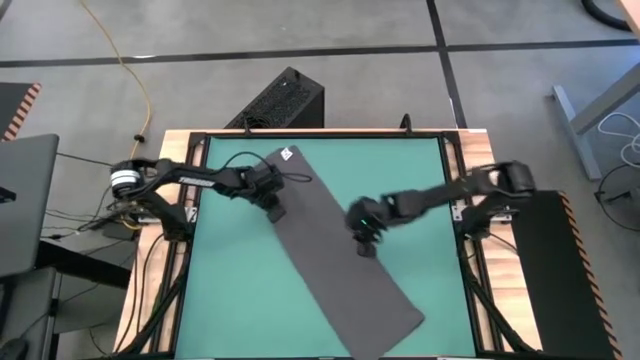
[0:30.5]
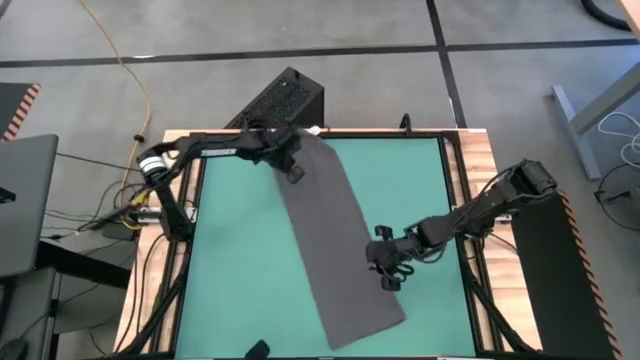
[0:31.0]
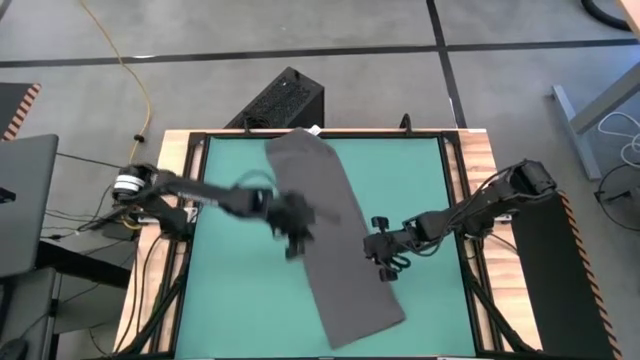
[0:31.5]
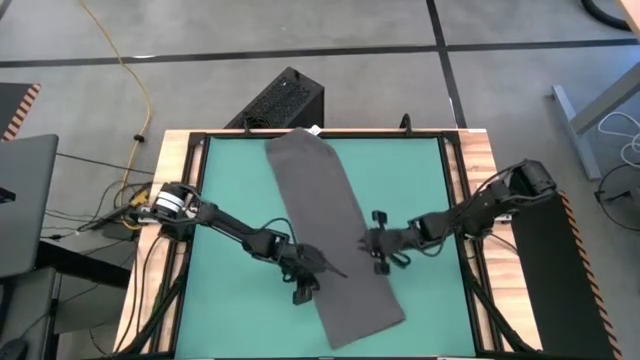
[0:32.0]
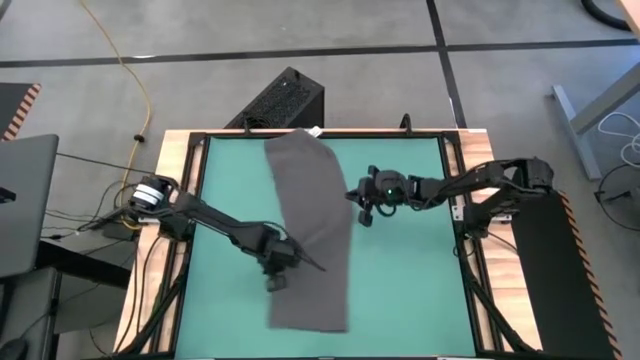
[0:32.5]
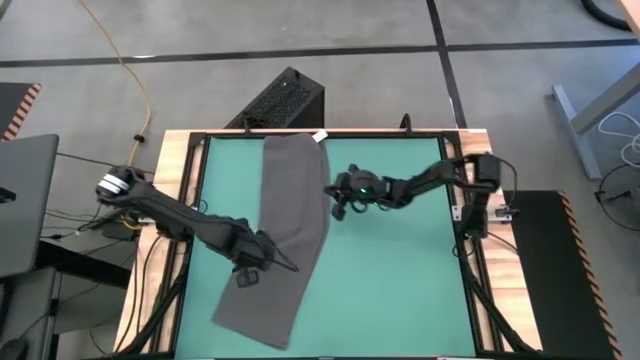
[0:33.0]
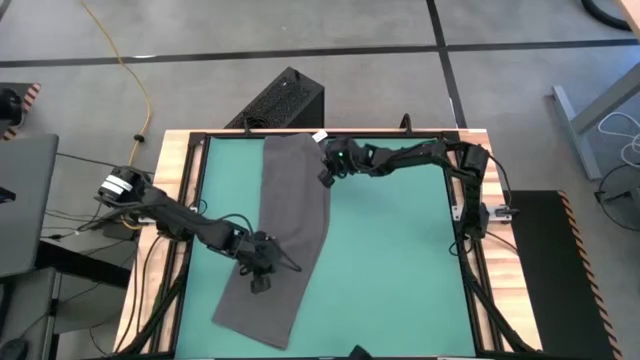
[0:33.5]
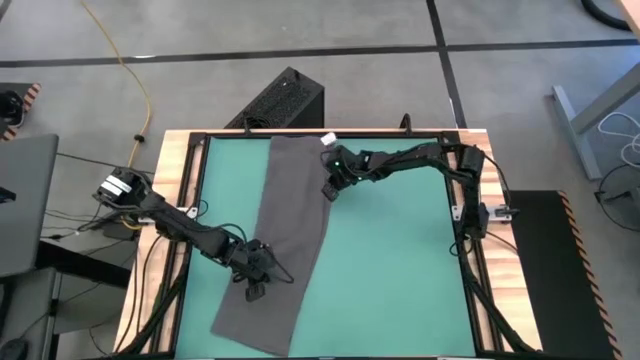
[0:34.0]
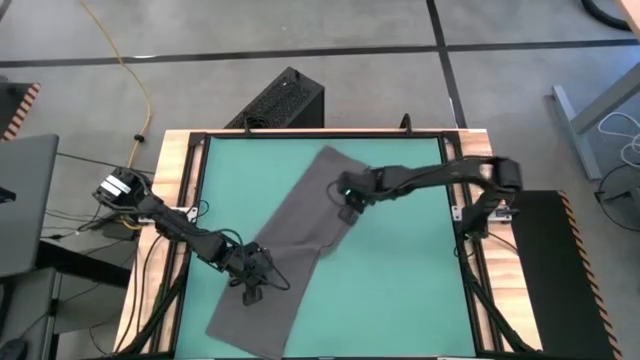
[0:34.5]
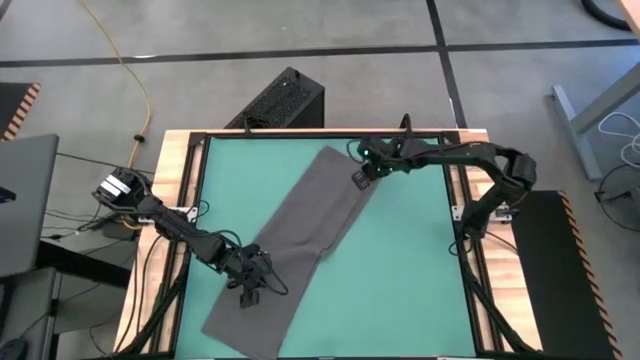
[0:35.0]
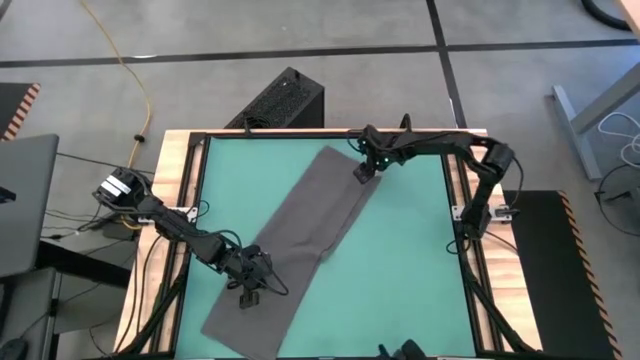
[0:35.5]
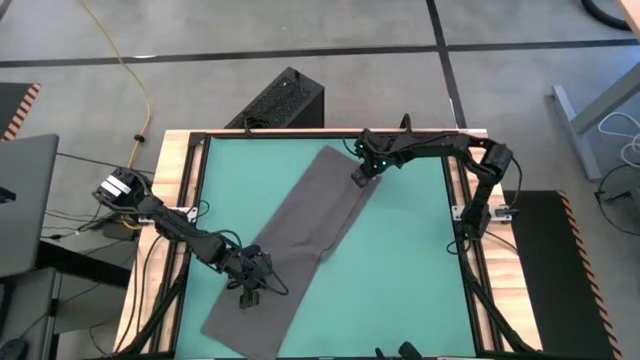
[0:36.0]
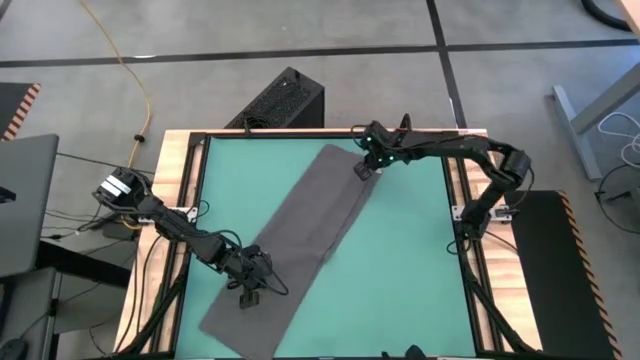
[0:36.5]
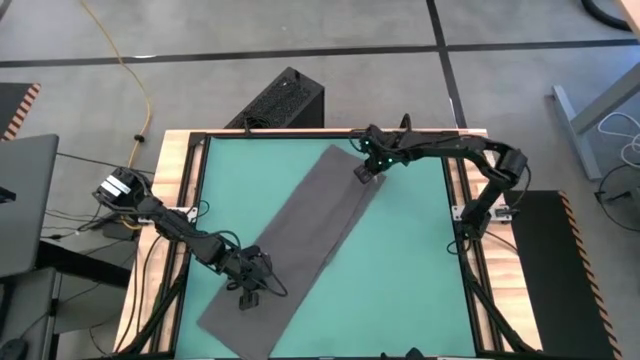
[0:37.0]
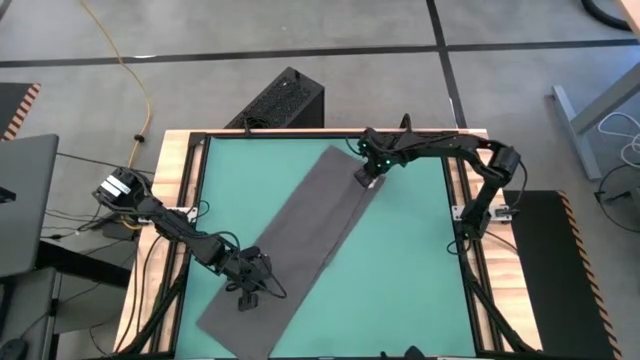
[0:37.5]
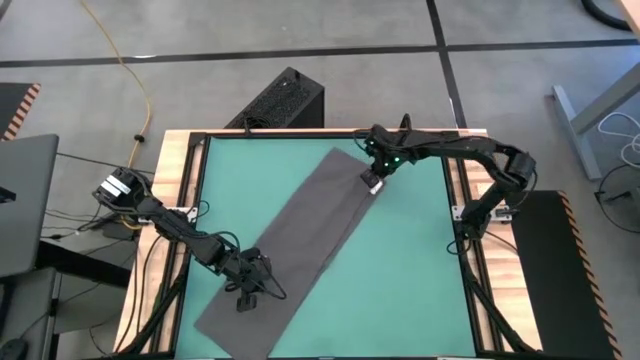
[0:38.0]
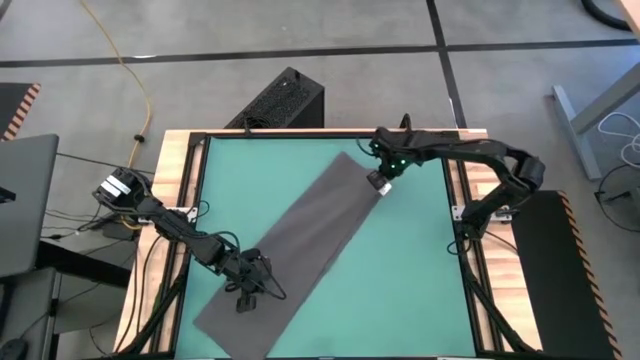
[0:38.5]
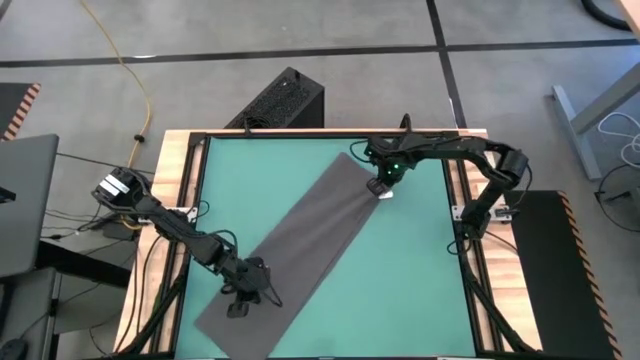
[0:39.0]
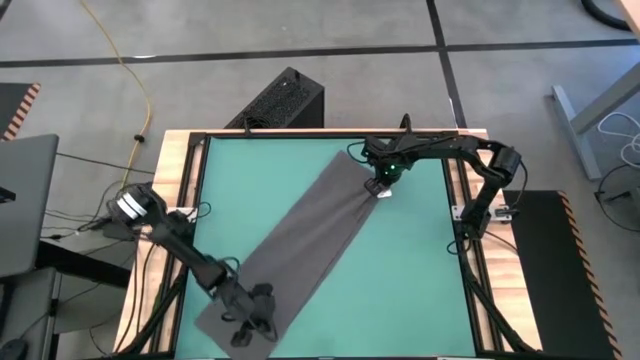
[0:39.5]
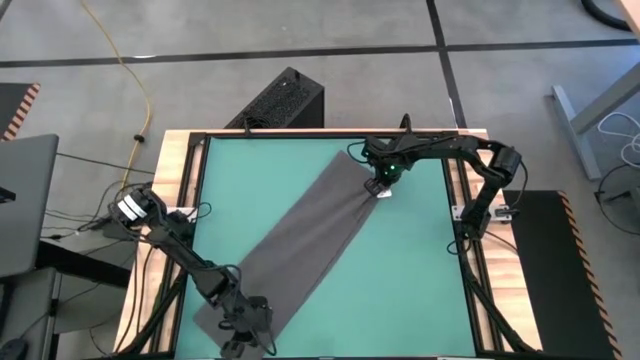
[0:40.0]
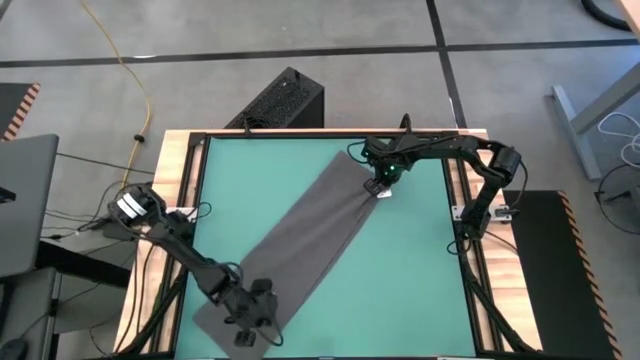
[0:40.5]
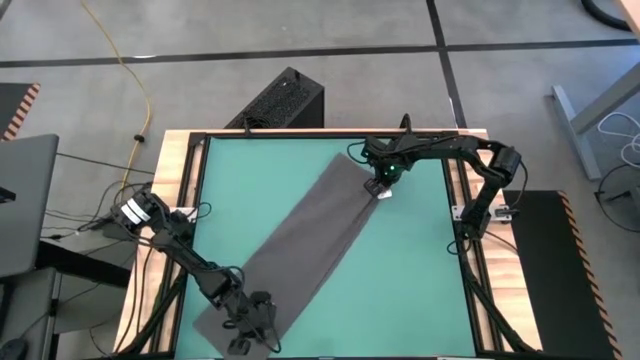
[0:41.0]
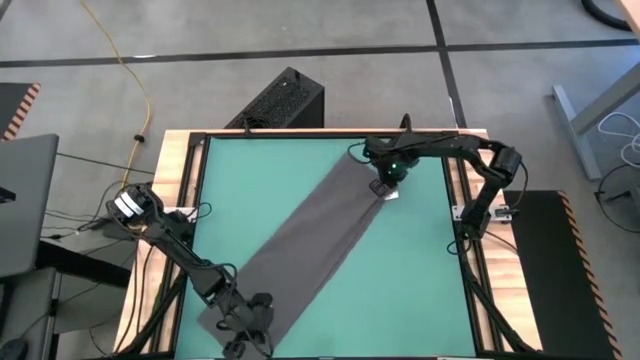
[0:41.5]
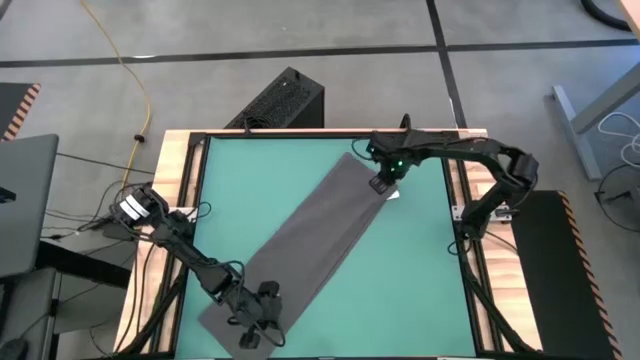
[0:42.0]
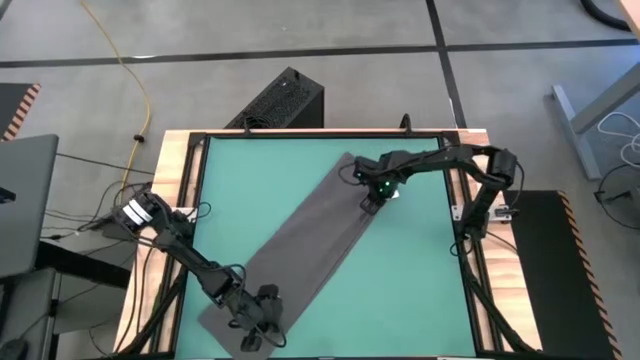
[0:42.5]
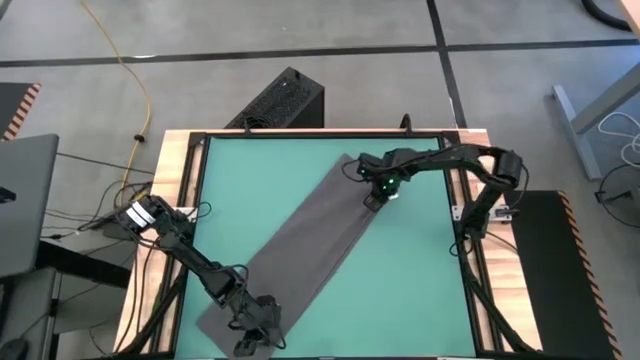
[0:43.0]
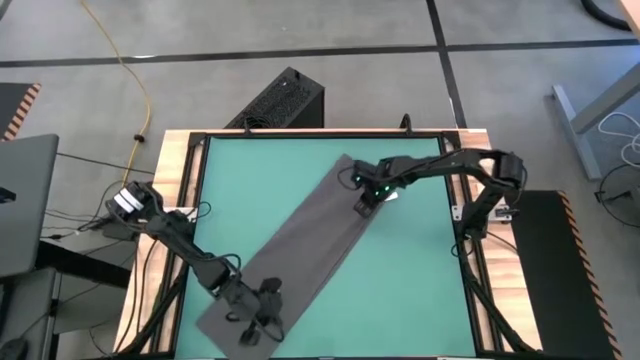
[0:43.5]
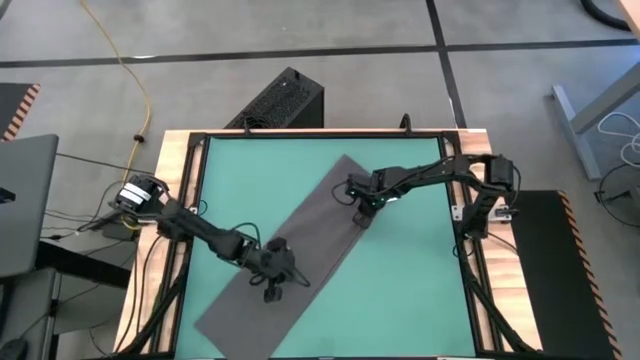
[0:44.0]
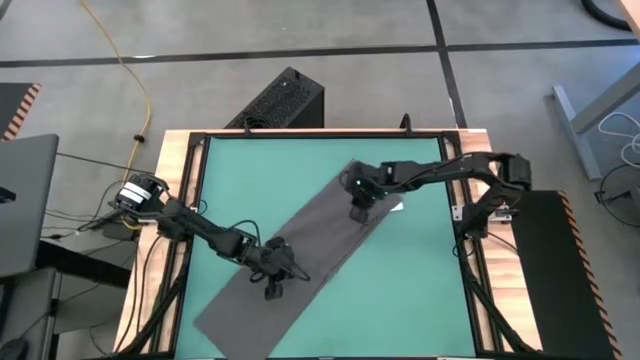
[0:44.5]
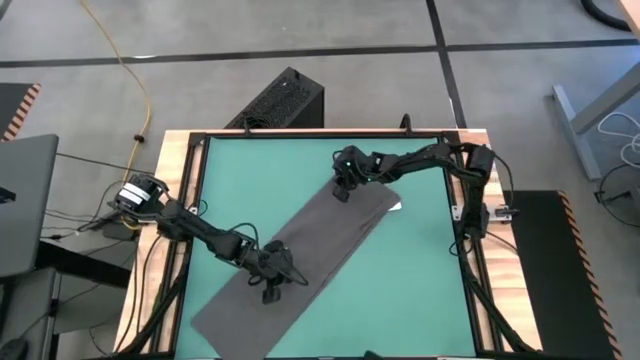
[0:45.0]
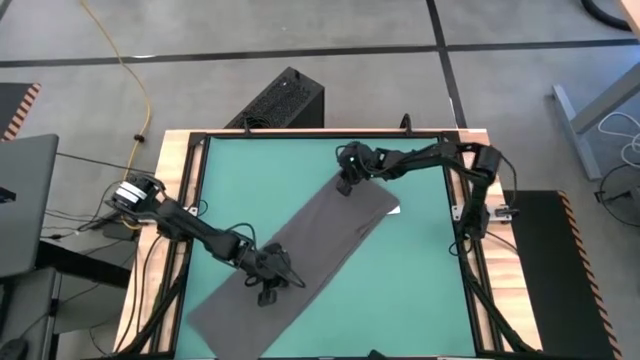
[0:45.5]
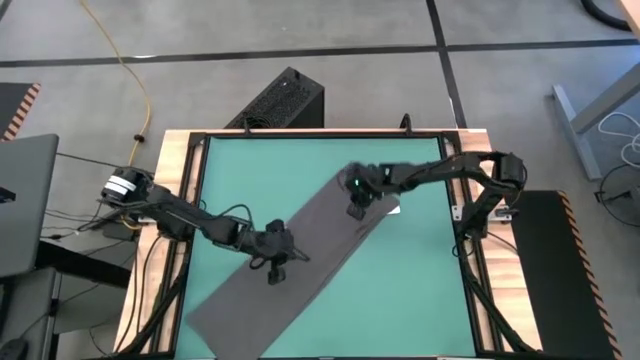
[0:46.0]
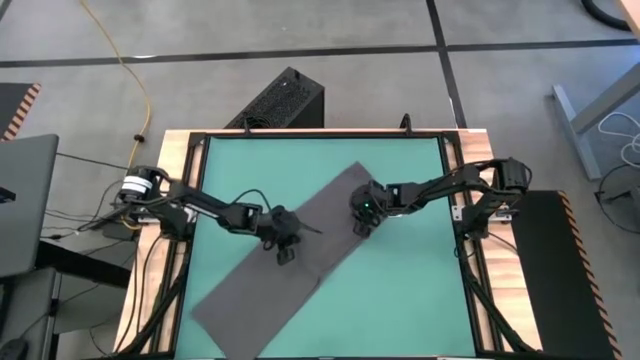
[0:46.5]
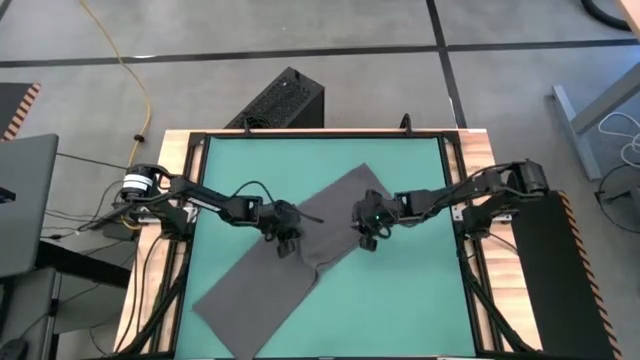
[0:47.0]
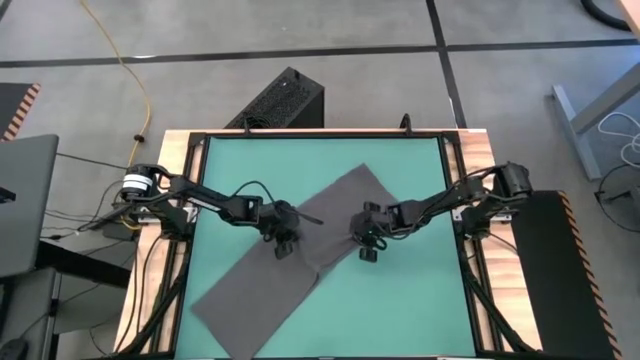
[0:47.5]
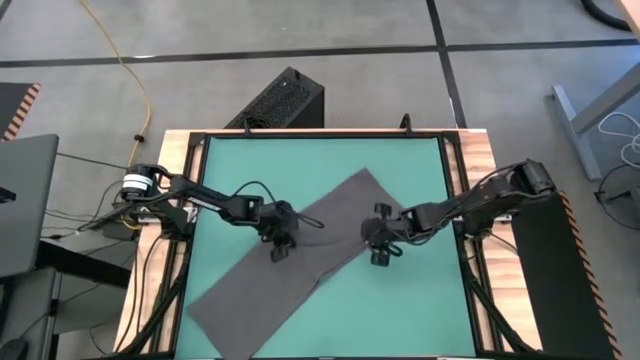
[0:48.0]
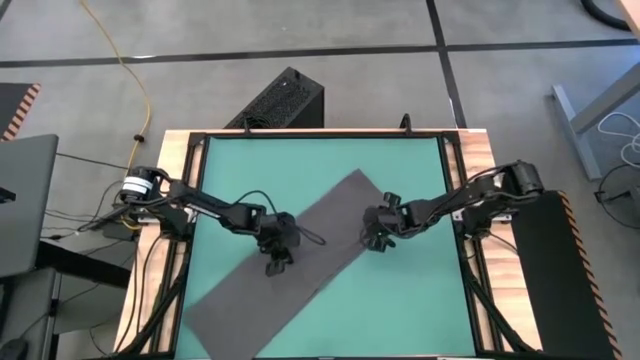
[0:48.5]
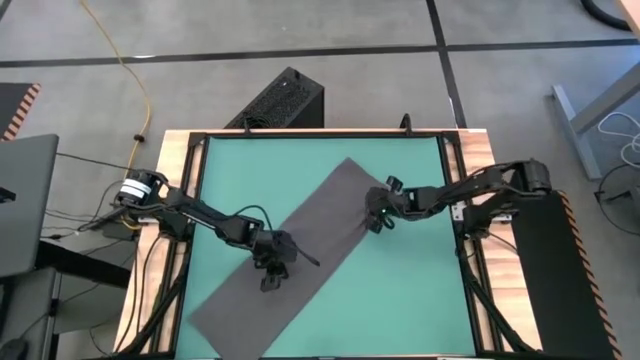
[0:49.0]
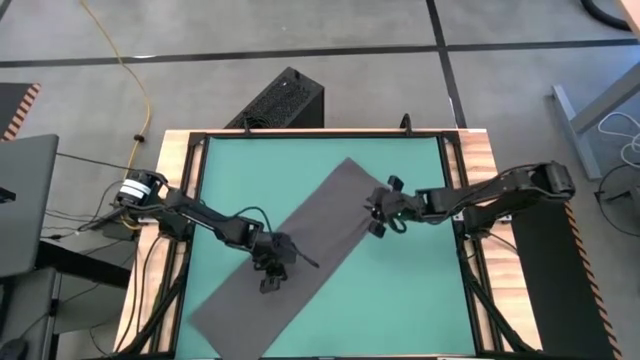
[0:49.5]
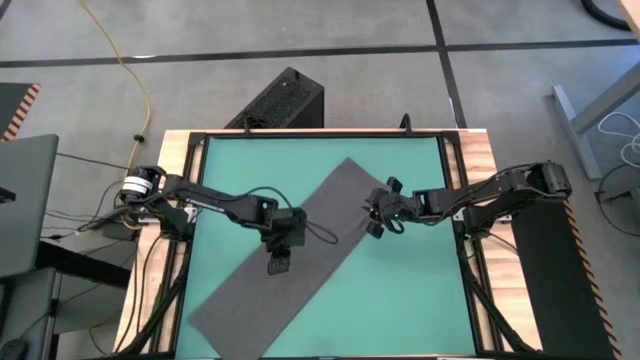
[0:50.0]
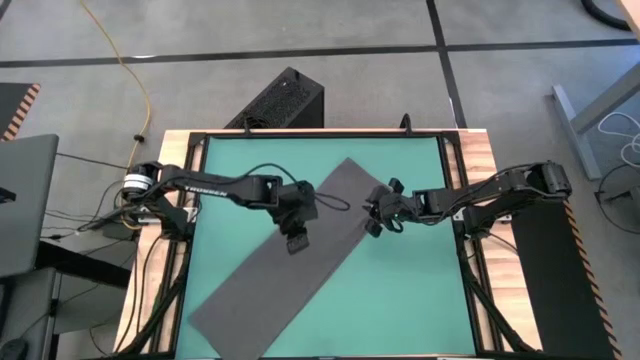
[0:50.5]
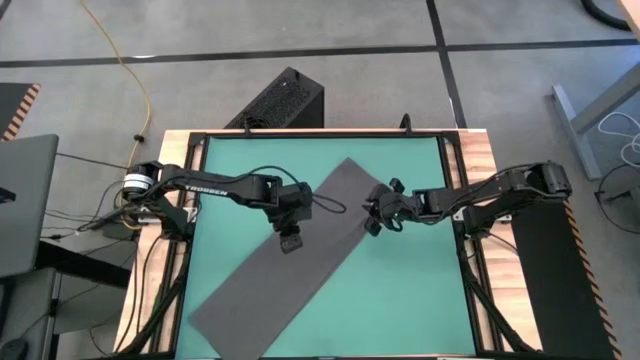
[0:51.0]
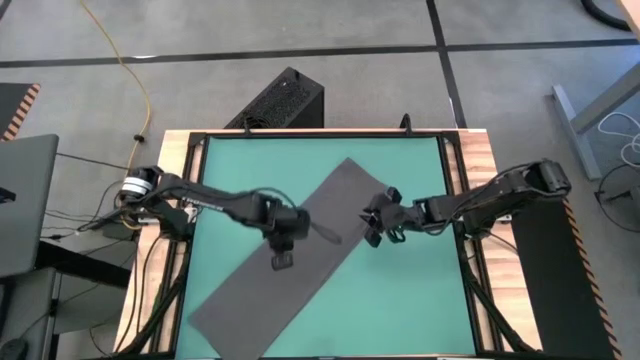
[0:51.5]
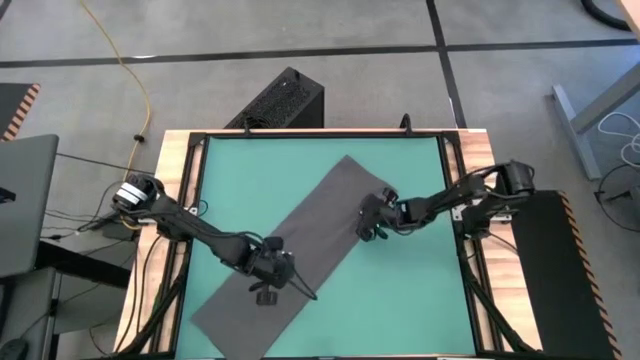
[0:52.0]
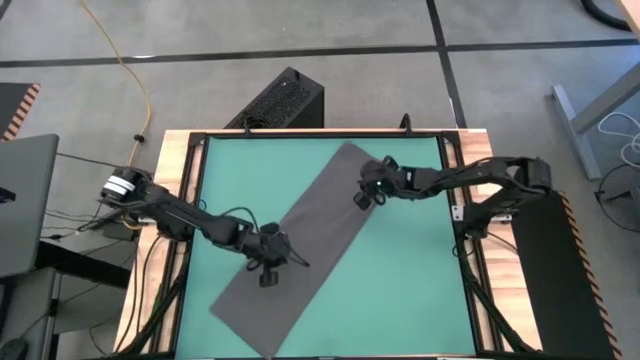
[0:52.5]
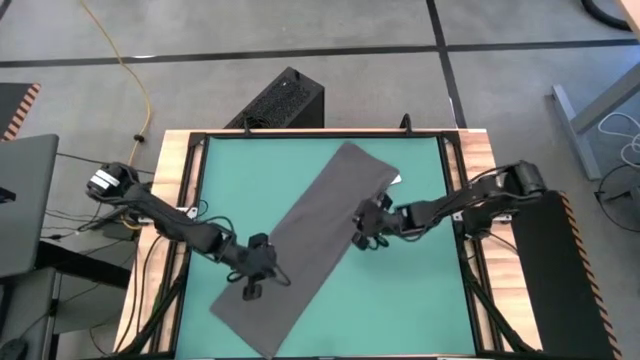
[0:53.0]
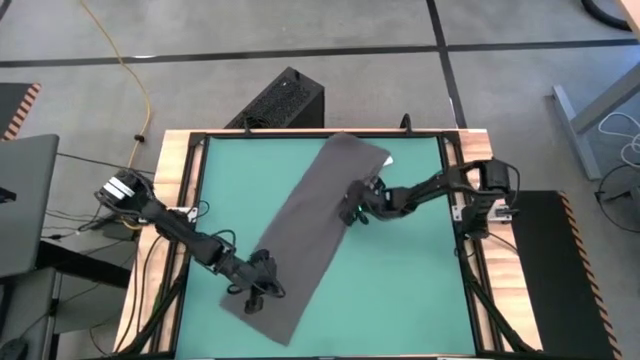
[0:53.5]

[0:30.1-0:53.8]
Task: Roll towel into tight, uniform cylinder
Fold the gray towel
